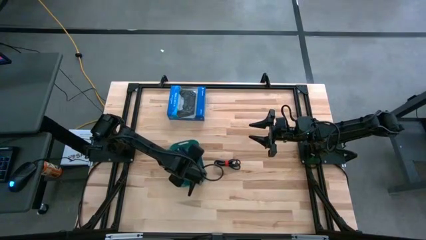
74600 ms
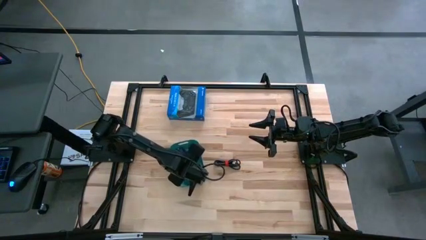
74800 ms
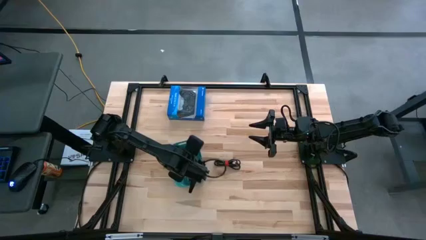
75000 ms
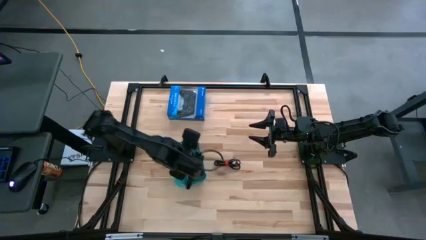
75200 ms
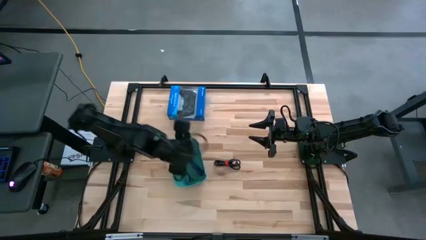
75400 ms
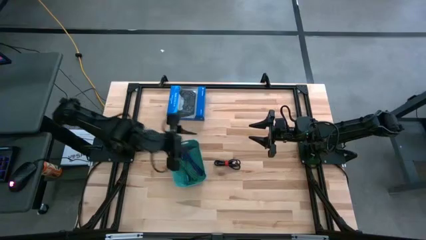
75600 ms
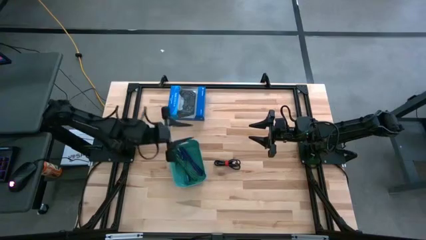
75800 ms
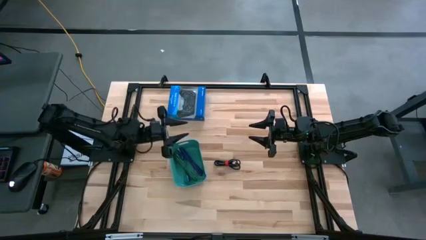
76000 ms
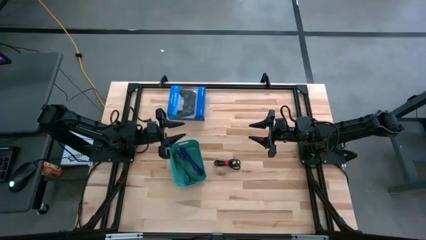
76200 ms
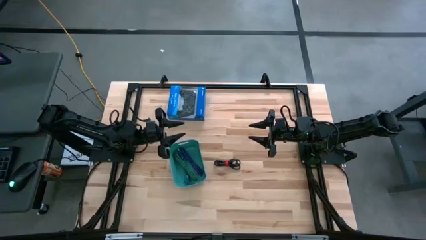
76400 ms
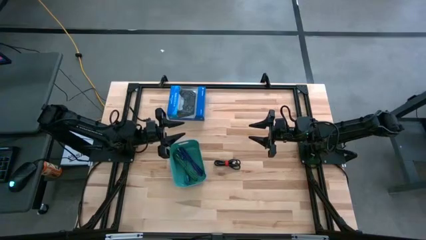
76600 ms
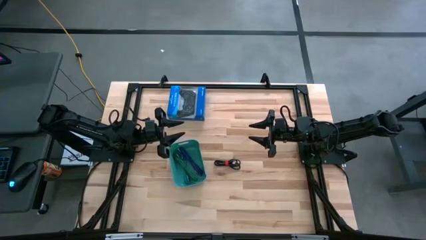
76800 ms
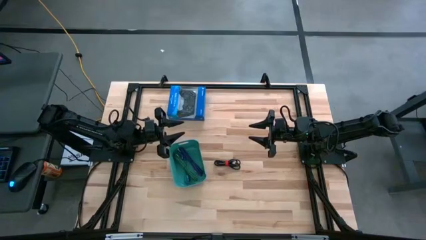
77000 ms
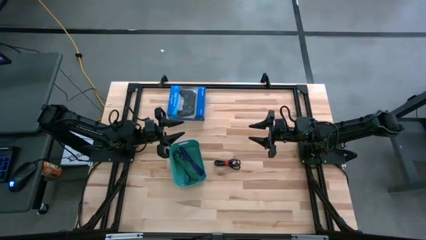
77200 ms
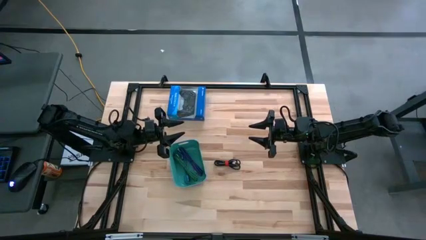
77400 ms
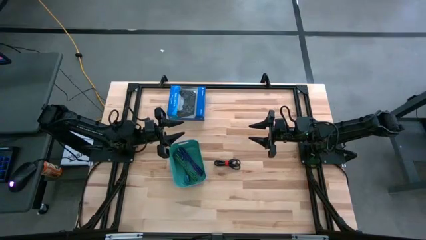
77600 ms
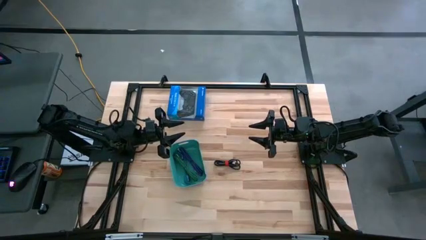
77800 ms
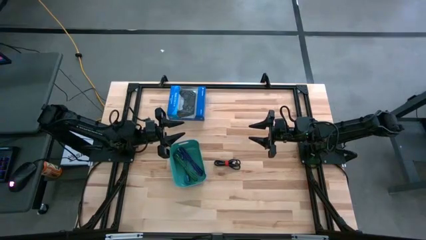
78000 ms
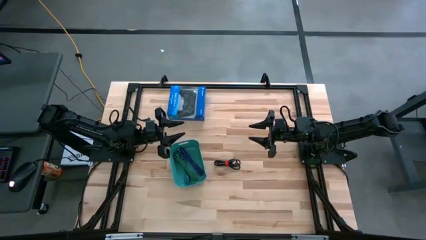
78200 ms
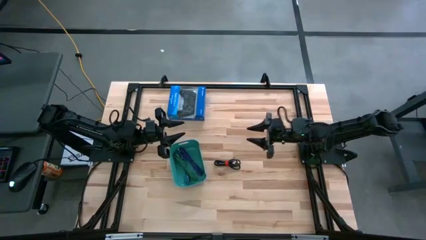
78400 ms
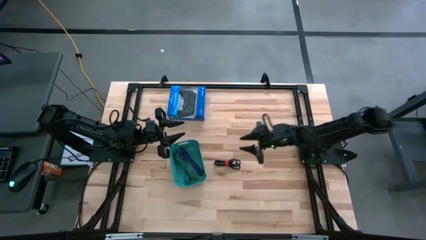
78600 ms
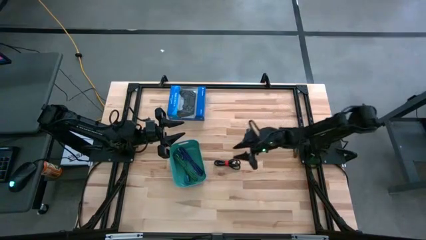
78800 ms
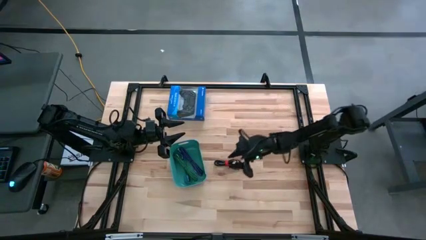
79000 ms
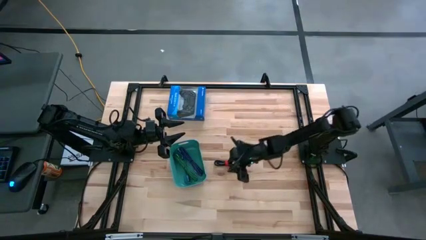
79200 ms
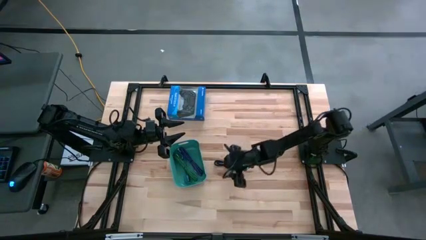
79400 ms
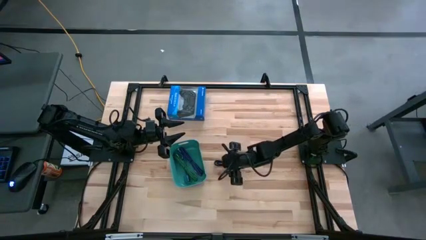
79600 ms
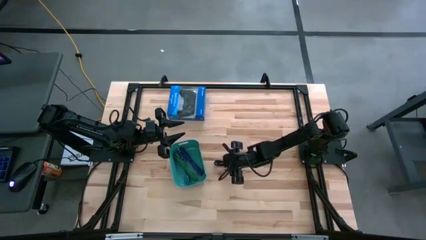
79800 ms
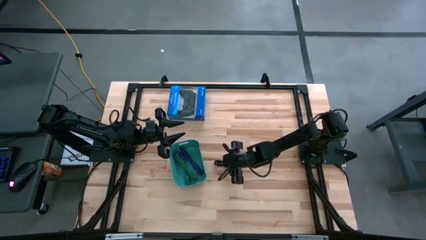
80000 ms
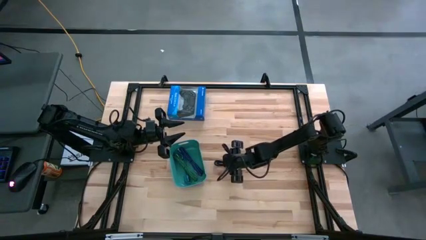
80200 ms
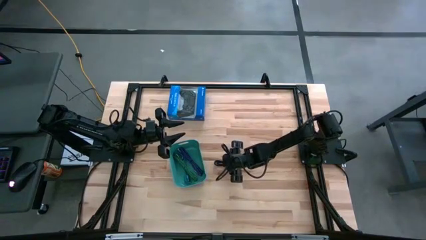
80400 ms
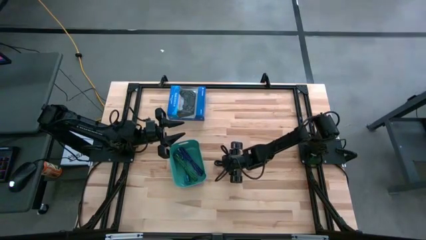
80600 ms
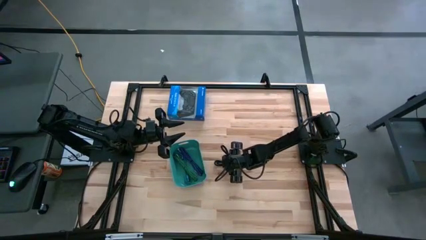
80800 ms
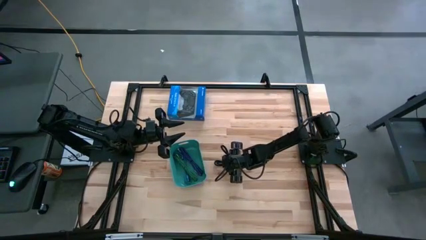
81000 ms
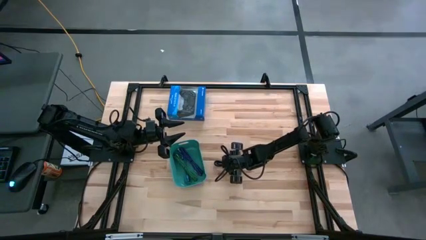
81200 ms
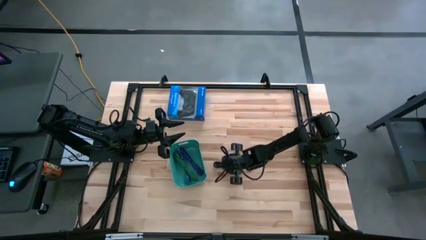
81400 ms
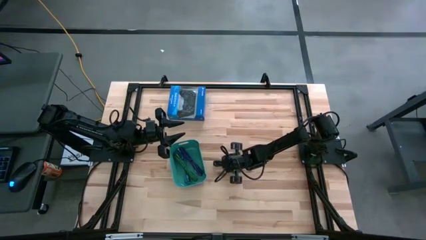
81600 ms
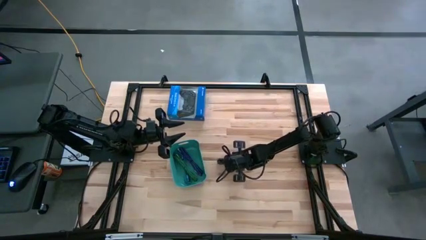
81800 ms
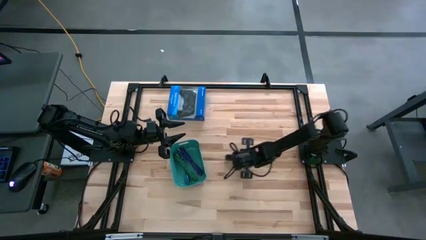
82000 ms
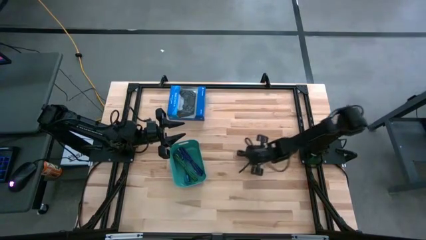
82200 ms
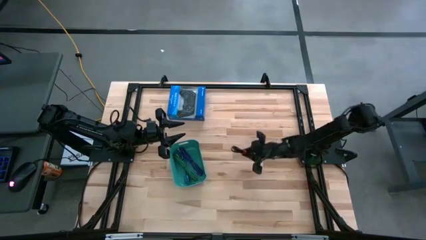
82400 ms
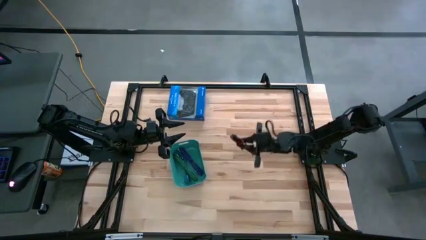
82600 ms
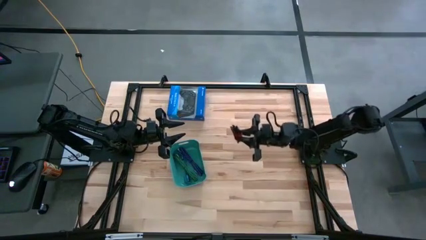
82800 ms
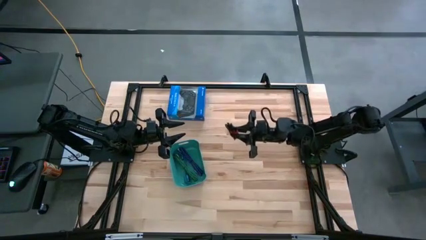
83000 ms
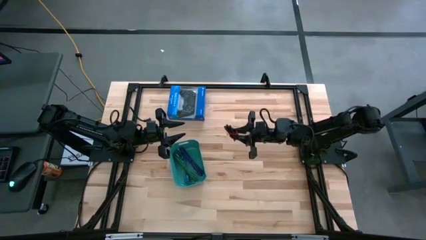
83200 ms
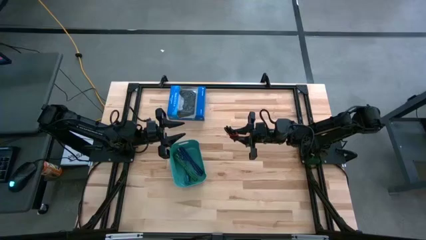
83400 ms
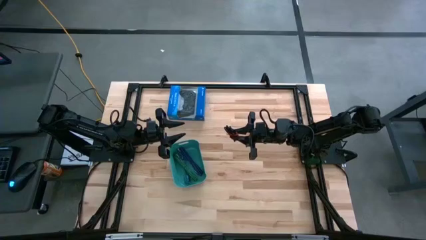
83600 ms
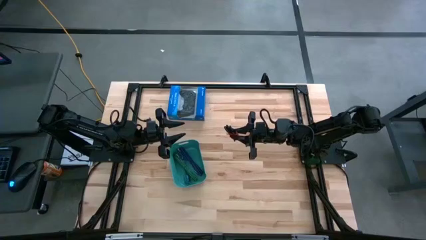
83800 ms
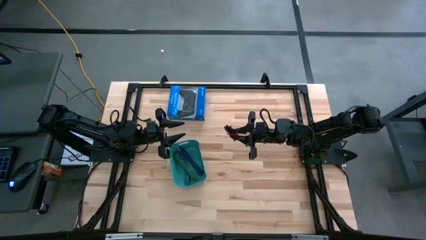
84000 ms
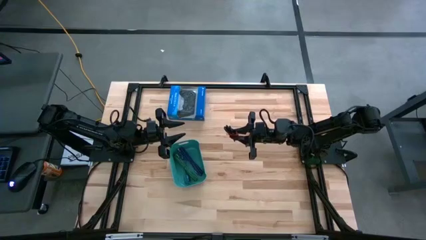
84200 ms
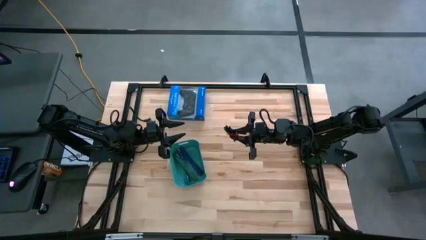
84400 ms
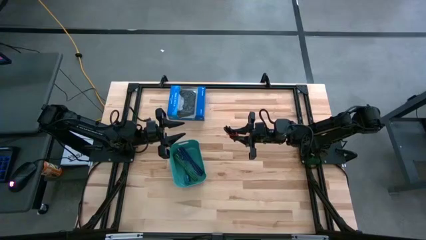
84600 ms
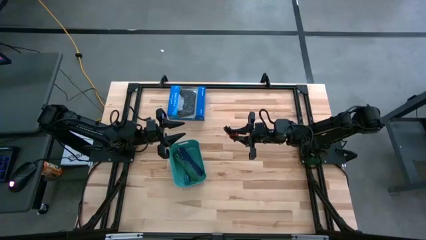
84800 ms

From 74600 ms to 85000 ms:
Task: Pick and place USB-C Cables
Put the black charger cable into the green bin
